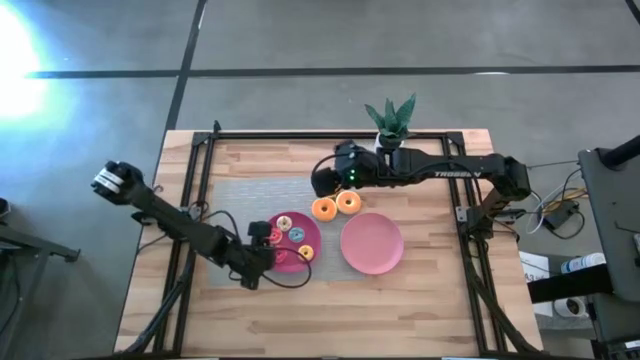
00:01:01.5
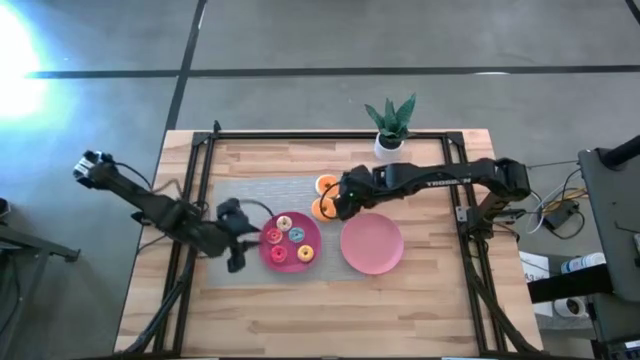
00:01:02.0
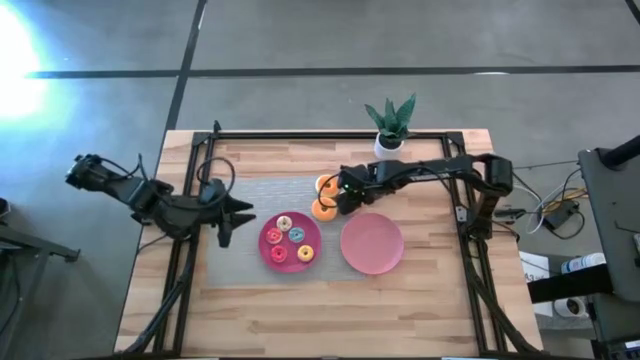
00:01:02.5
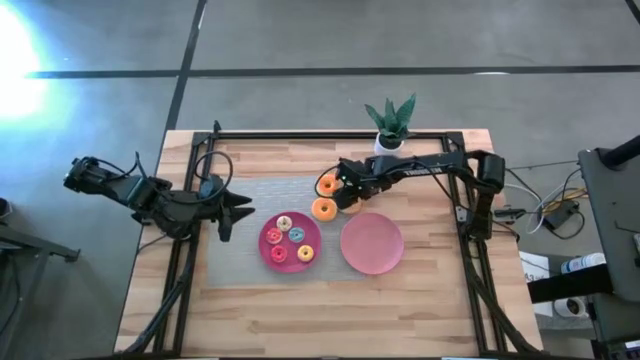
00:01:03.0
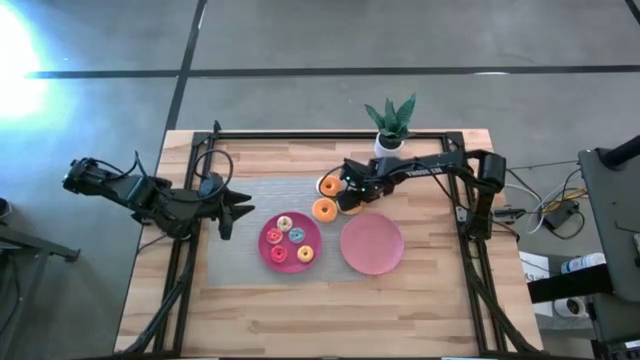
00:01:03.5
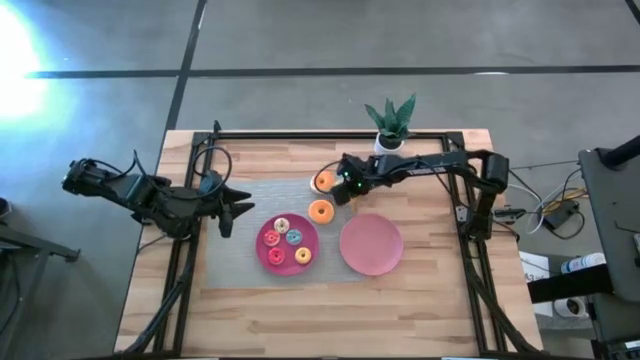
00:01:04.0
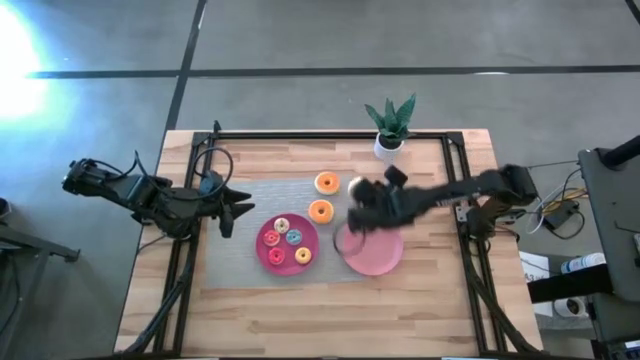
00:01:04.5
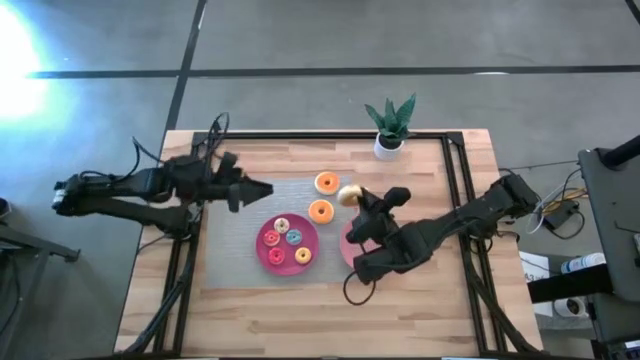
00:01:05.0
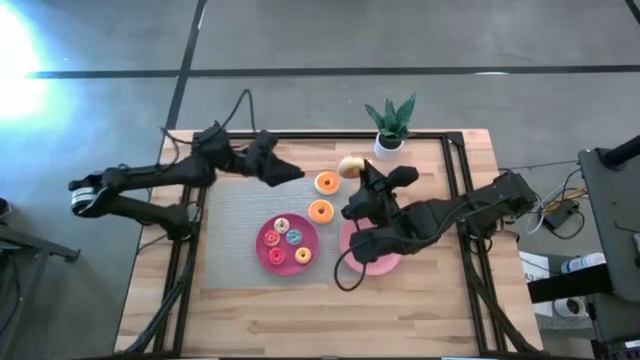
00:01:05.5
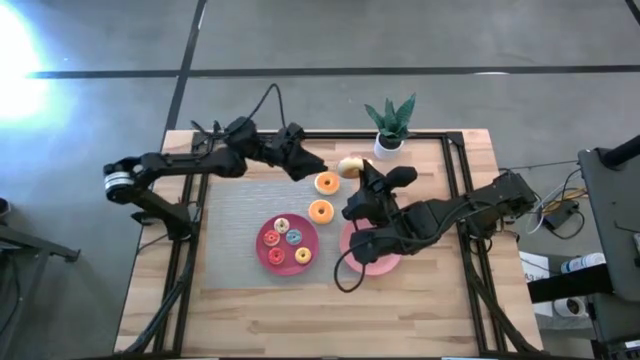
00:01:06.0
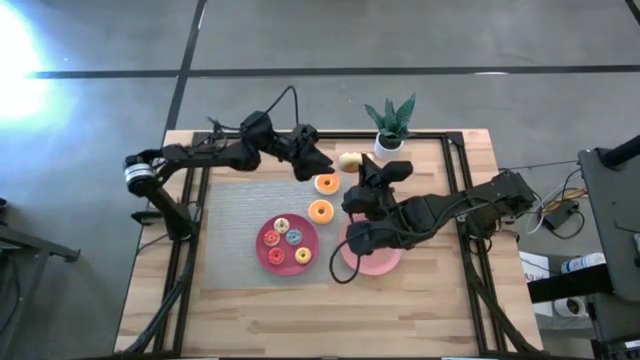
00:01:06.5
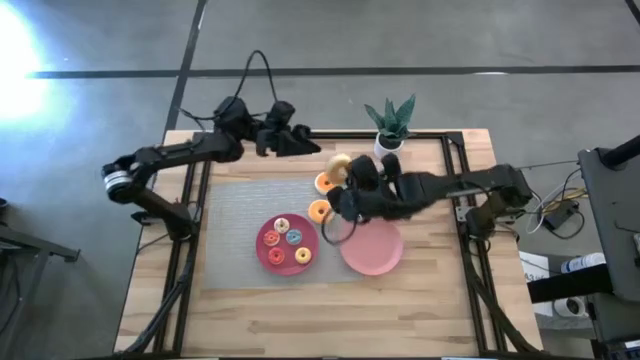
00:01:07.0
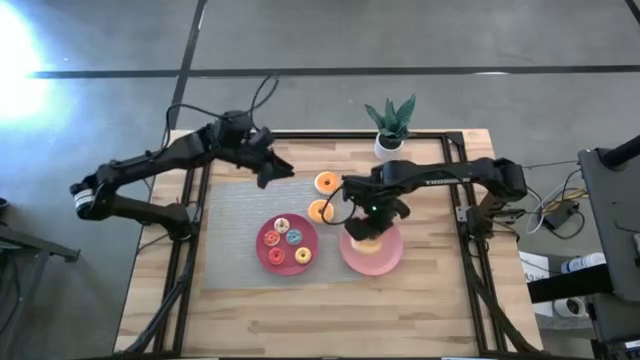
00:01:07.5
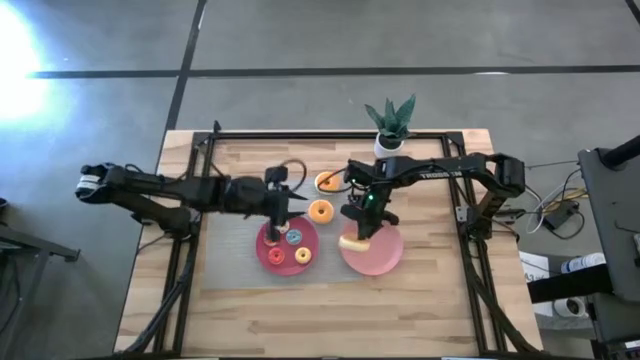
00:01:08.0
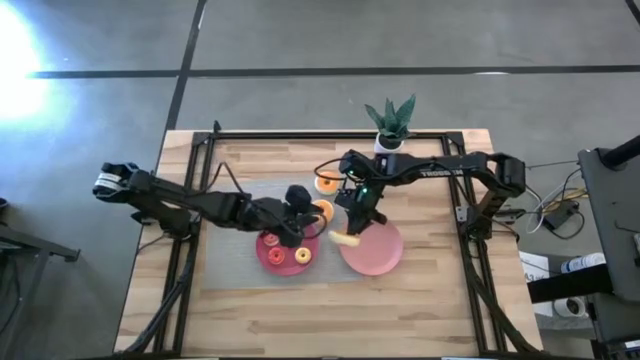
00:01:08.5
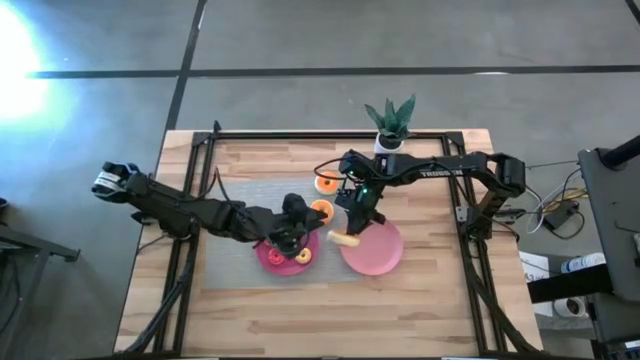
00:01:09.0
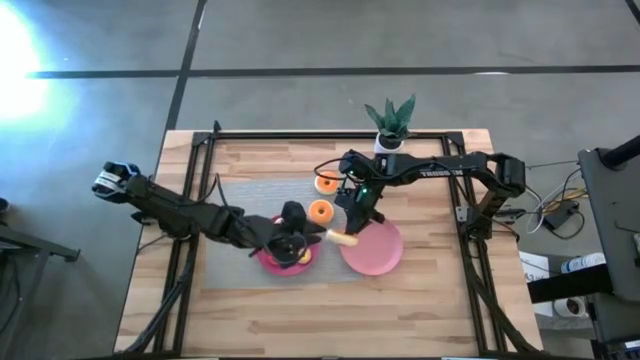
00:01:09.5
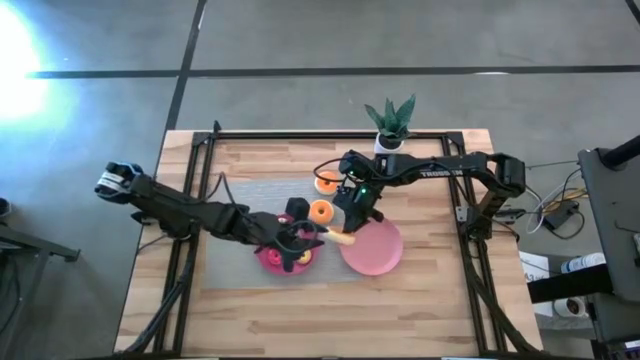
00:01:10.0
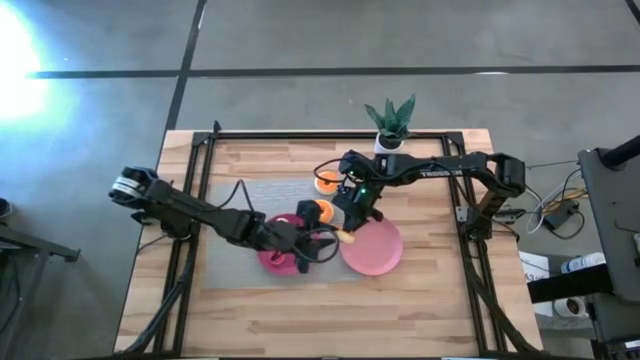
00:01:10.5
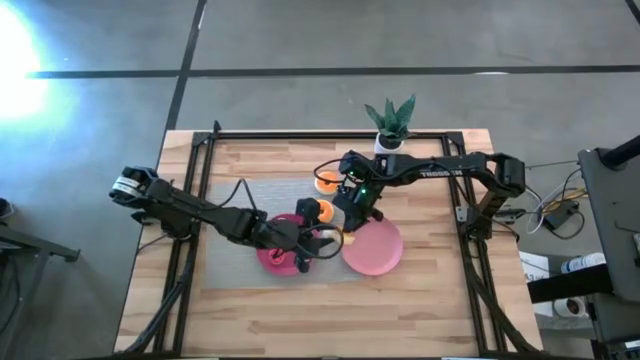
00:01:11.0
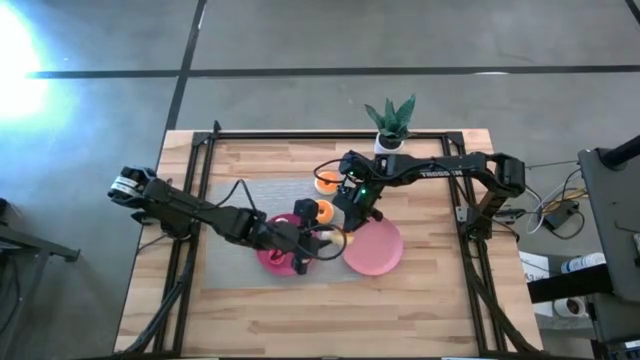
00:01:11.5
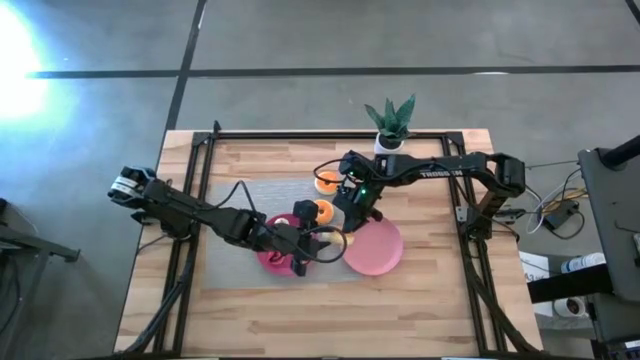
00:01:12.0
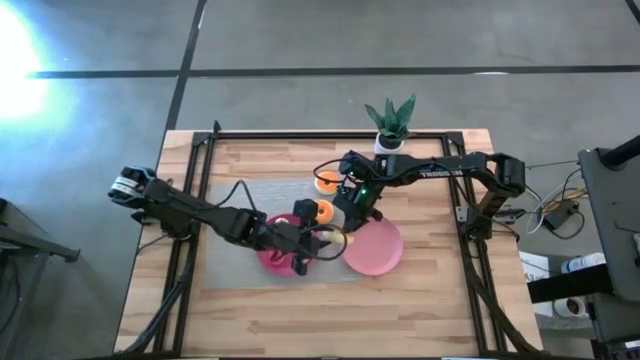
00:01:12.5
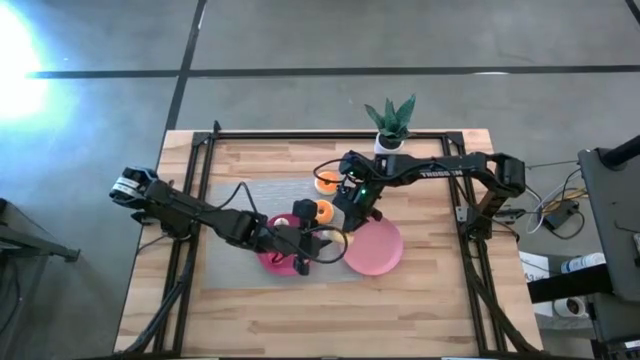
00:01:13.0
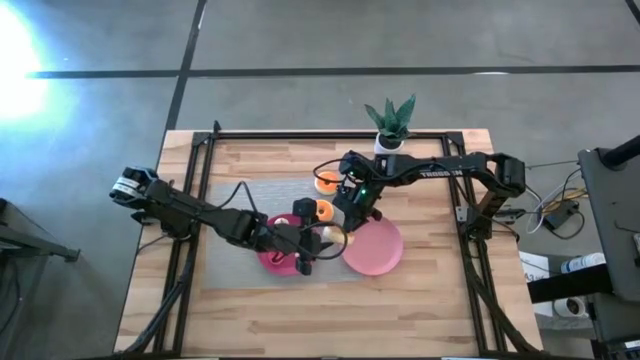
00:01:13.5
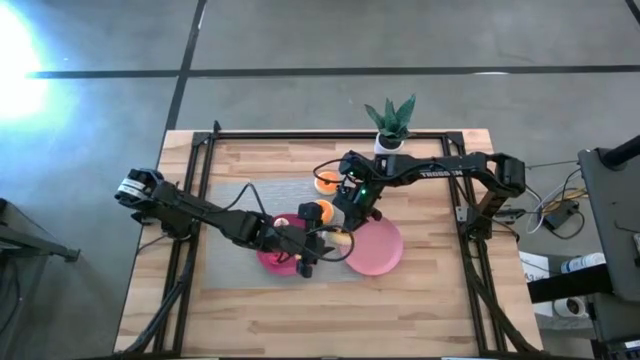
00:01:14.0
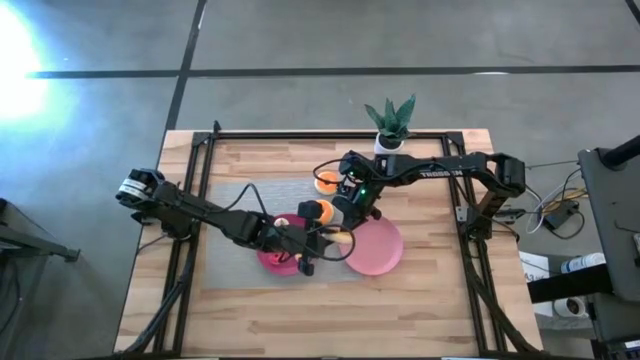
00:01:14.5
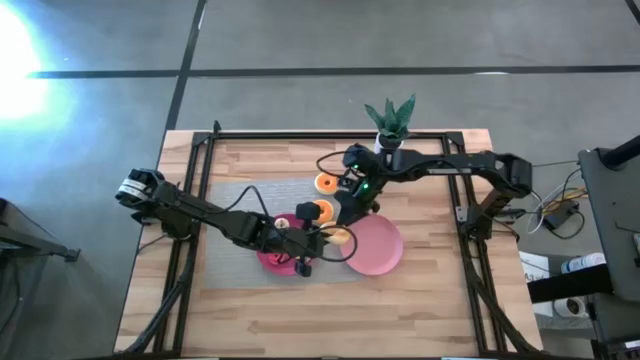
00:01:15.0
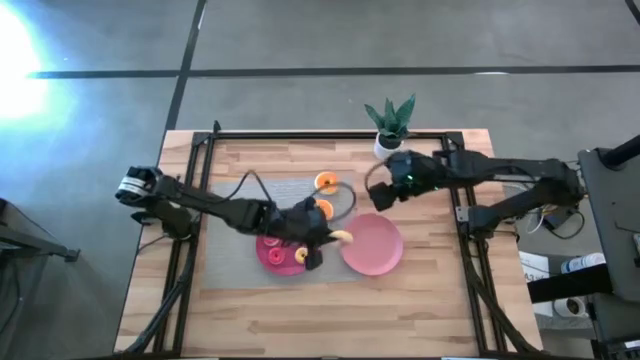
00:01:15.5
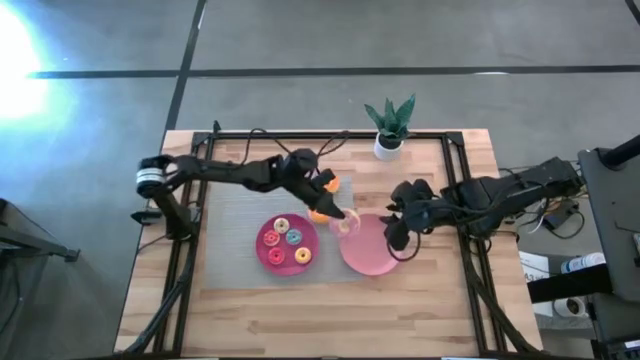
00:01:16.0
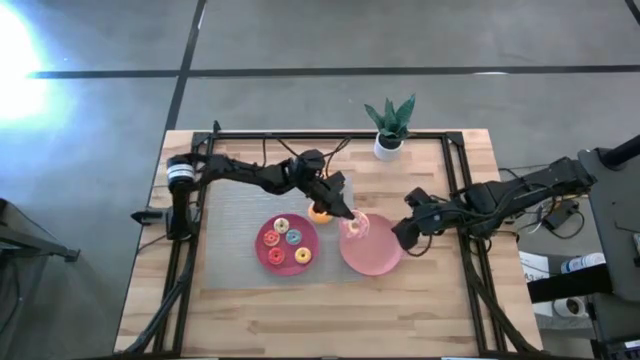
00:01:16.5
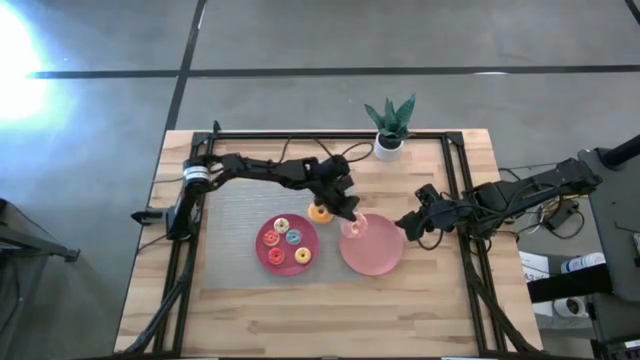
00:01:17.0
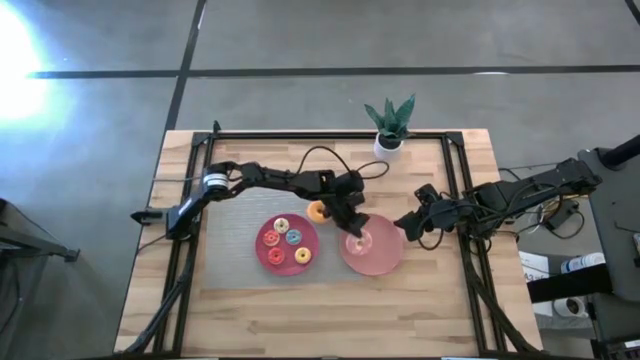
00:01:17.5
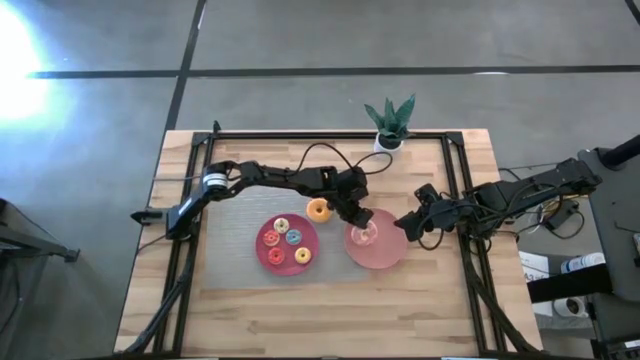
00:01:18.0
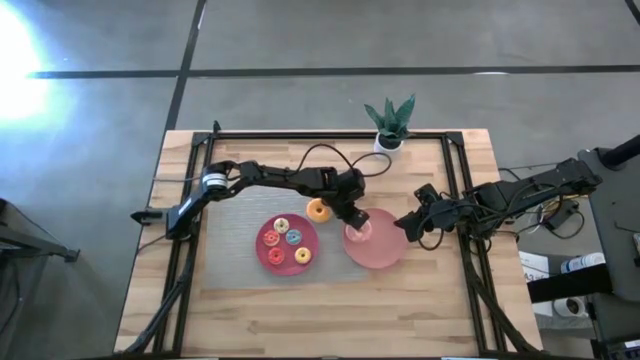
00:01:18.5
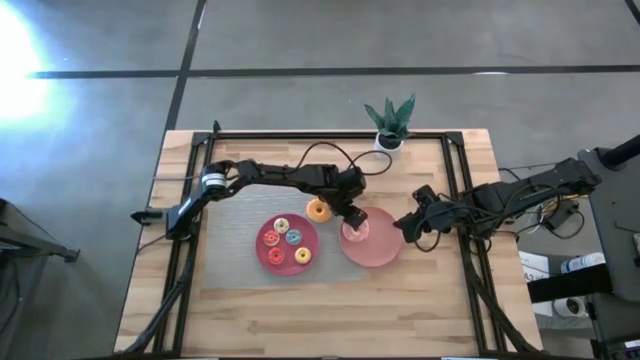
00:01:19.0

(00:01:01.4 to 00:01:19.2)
Task: Pick & Place donuts
Put the large pink donut on the pink plate

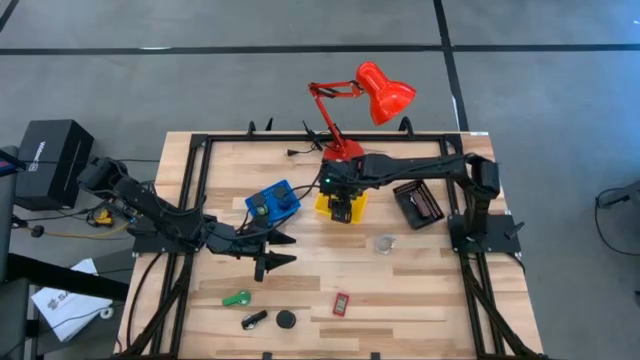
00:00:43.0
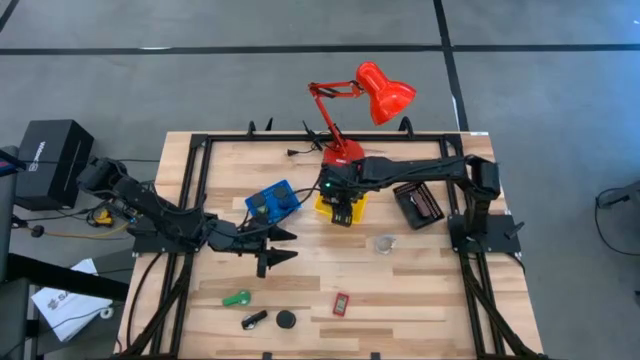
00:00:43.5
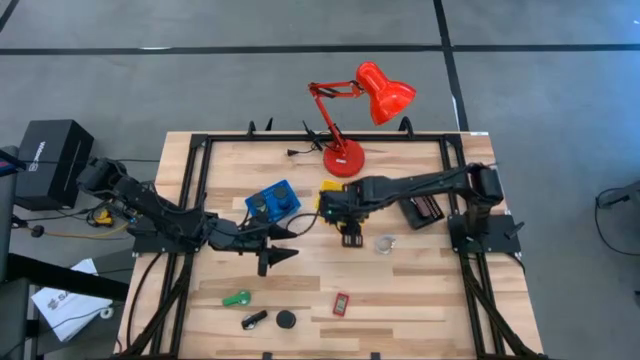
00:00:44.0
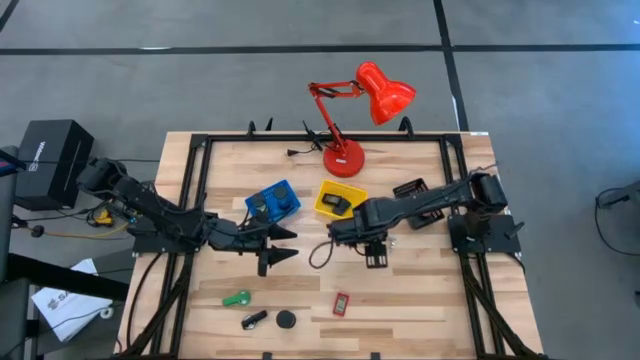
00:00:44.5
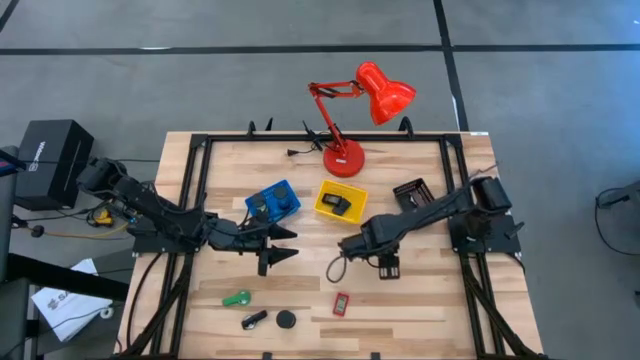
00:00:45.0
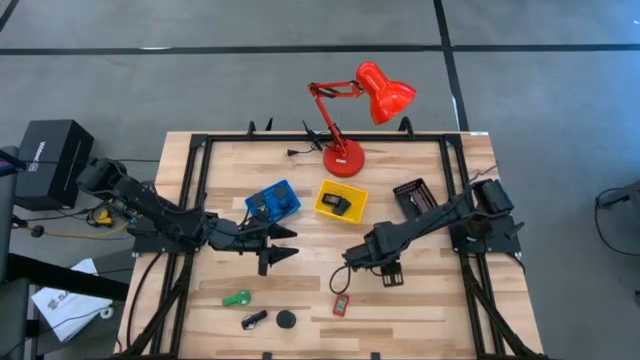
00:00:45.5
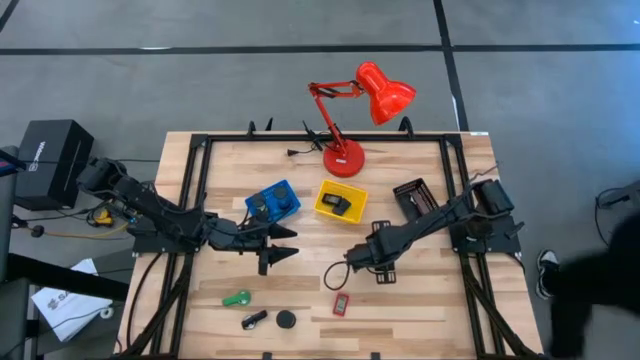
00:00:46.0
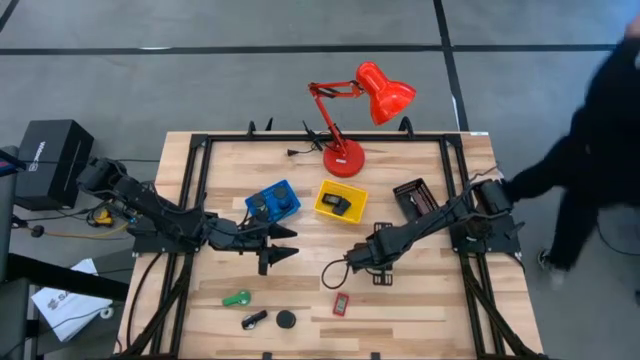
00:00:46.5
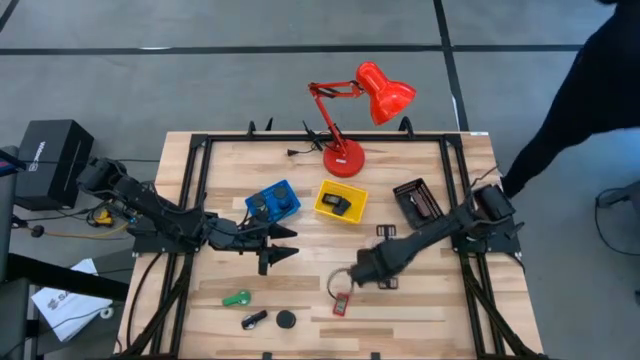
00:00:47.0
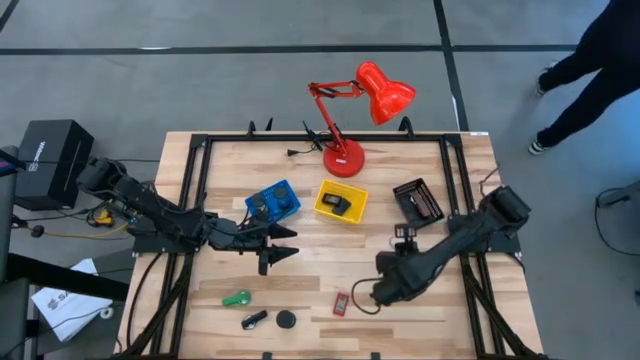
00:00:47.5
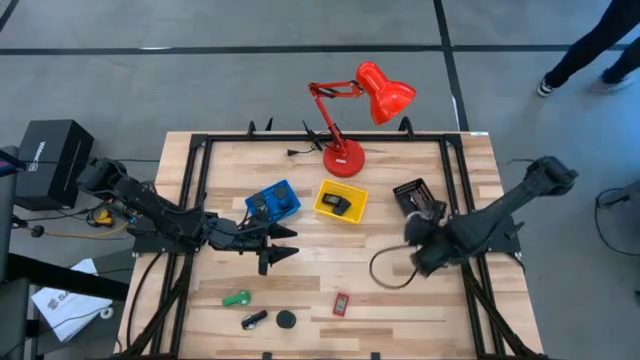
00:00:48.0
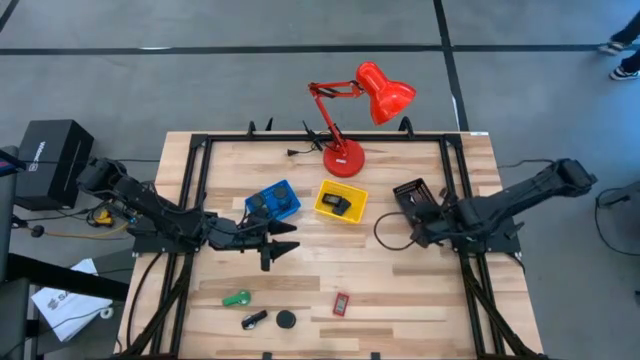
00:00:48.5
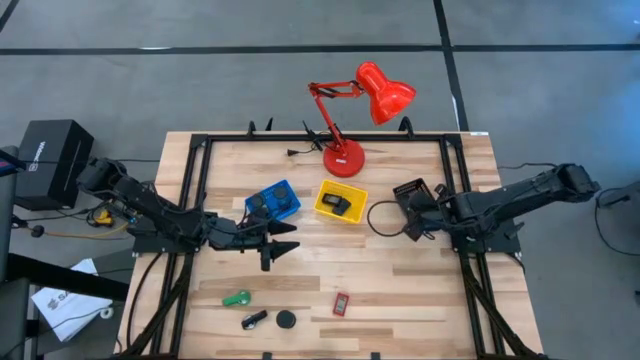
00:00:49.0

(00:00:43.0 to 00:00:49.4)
Task: Pick & Place Office items
Put the white wrist watch into the black bin
